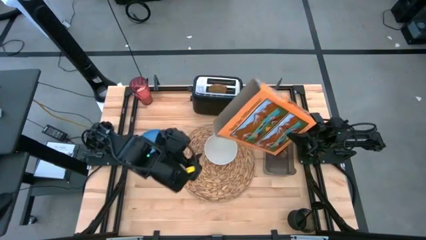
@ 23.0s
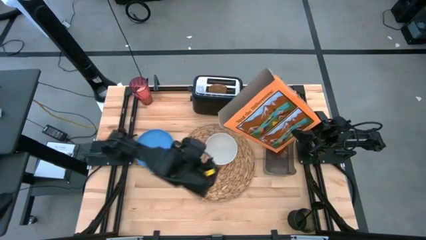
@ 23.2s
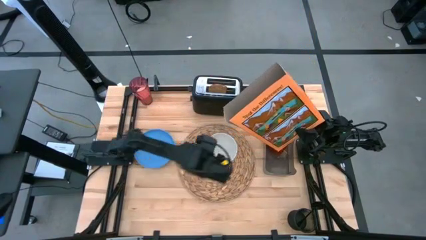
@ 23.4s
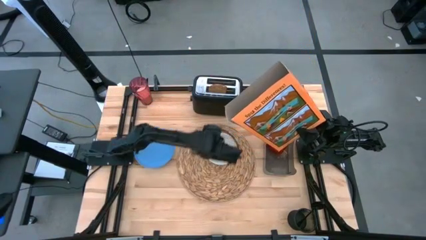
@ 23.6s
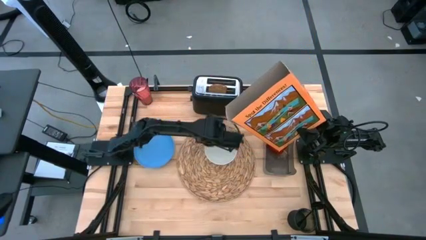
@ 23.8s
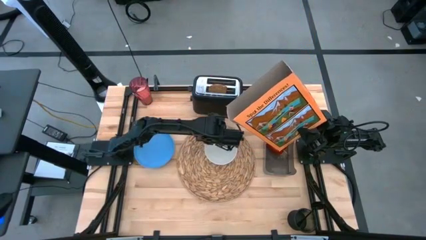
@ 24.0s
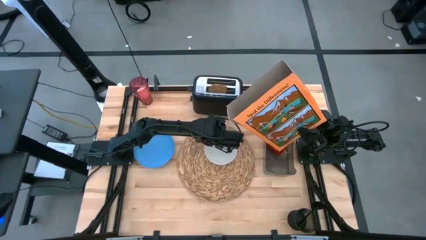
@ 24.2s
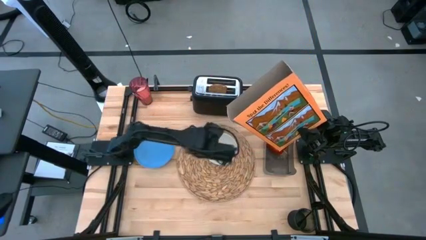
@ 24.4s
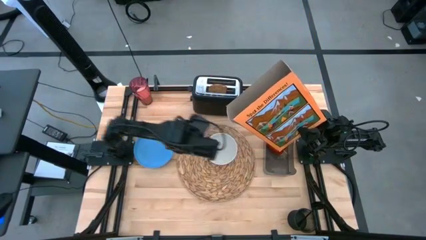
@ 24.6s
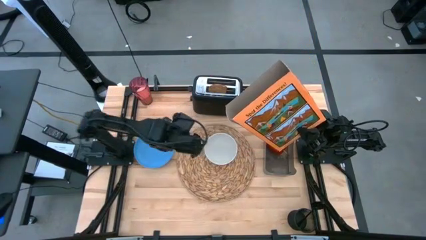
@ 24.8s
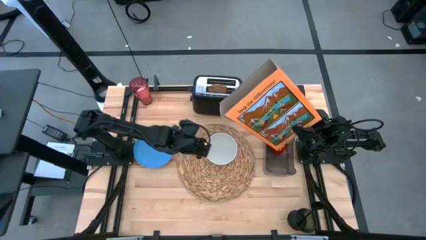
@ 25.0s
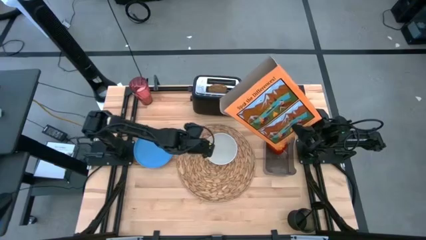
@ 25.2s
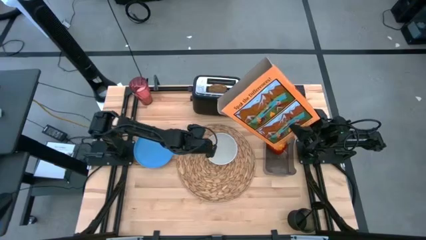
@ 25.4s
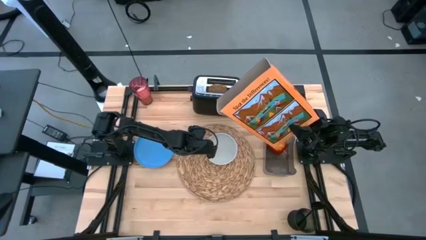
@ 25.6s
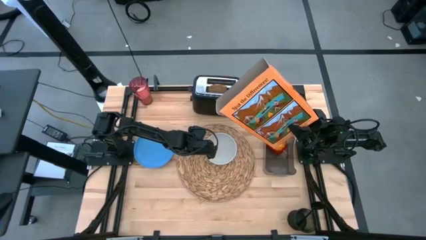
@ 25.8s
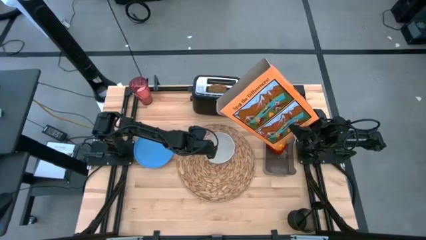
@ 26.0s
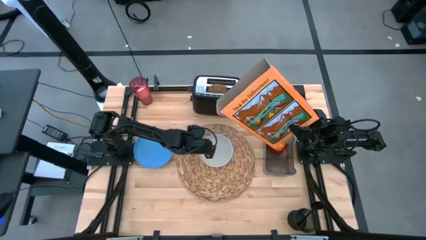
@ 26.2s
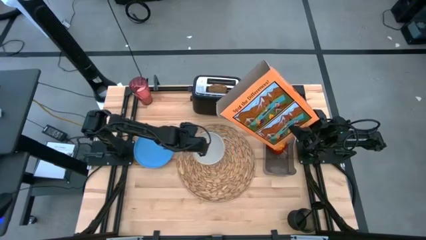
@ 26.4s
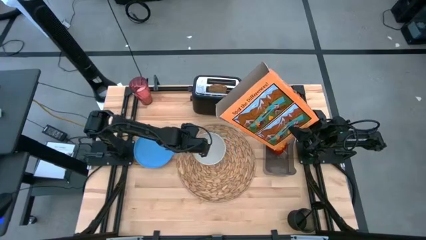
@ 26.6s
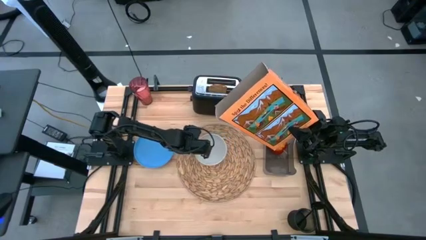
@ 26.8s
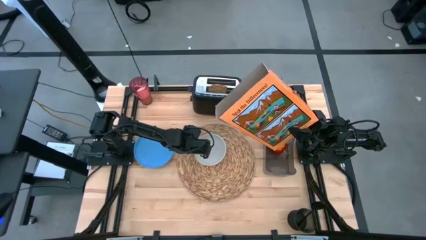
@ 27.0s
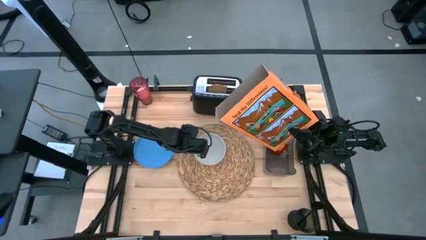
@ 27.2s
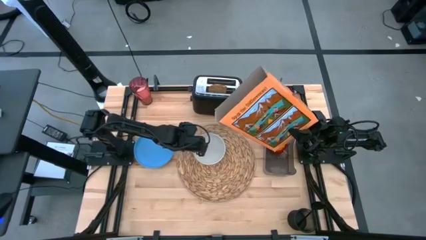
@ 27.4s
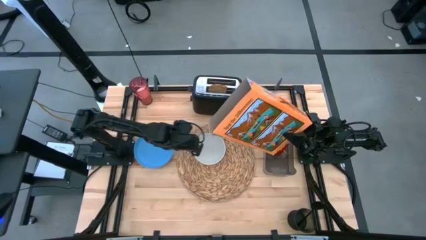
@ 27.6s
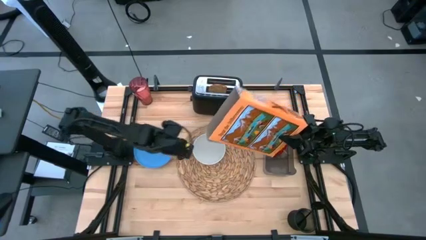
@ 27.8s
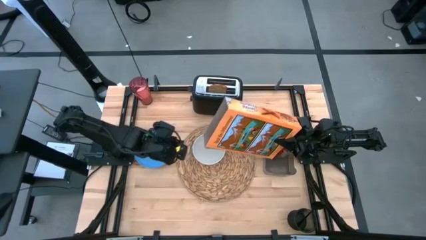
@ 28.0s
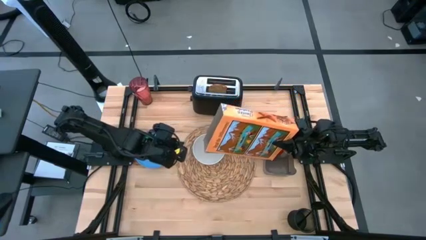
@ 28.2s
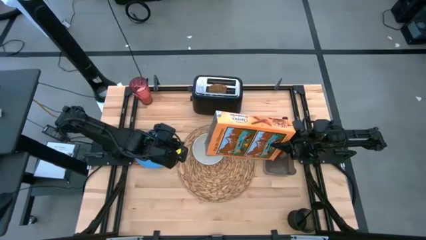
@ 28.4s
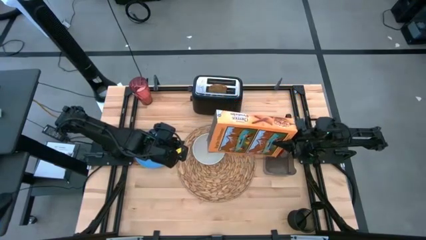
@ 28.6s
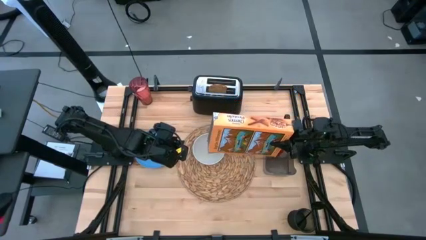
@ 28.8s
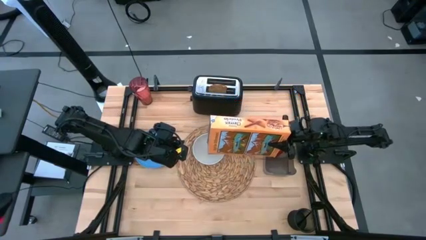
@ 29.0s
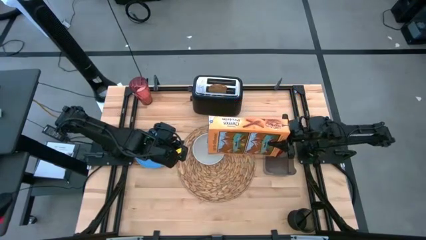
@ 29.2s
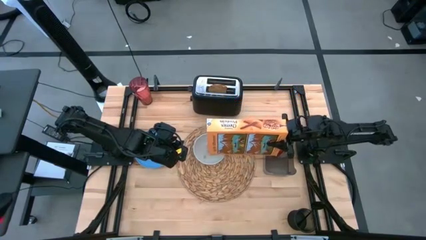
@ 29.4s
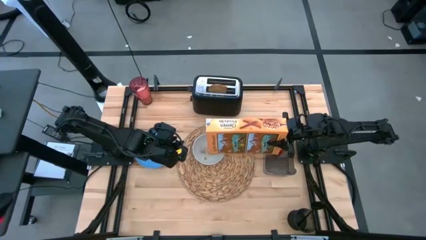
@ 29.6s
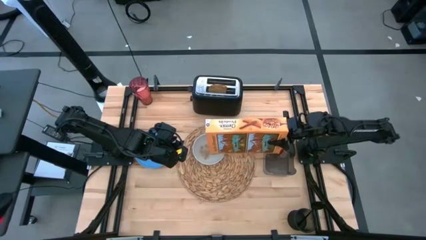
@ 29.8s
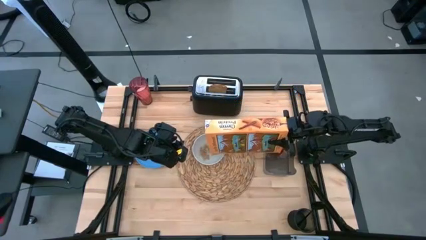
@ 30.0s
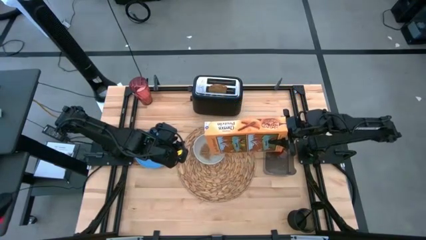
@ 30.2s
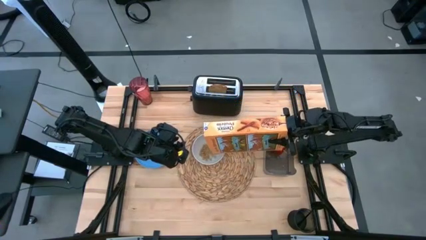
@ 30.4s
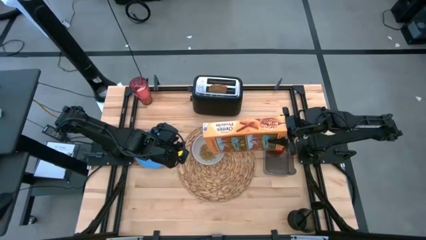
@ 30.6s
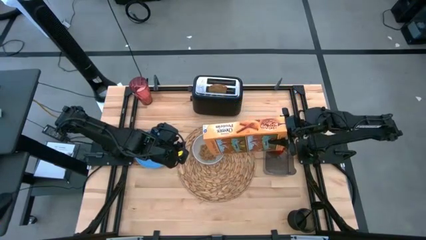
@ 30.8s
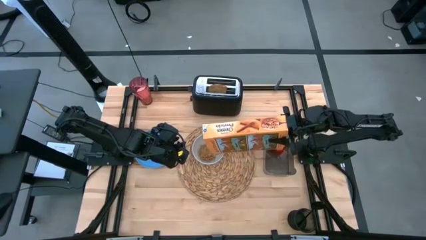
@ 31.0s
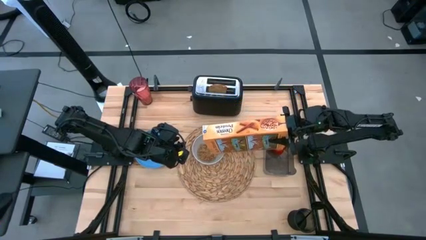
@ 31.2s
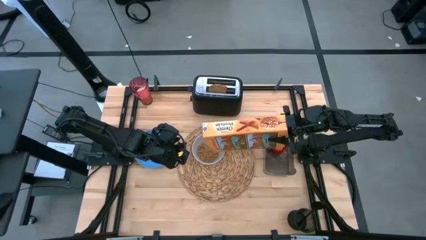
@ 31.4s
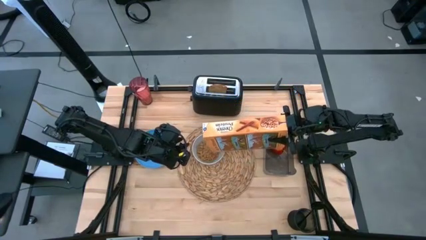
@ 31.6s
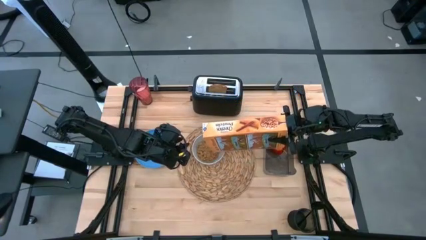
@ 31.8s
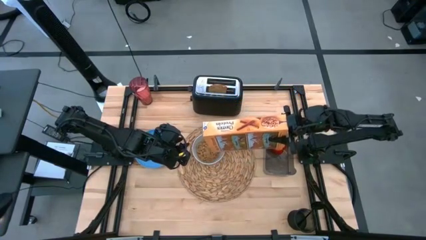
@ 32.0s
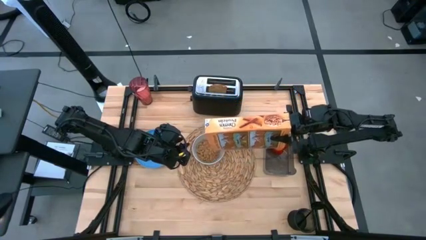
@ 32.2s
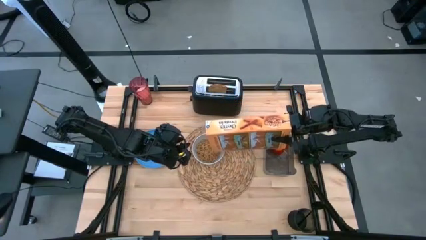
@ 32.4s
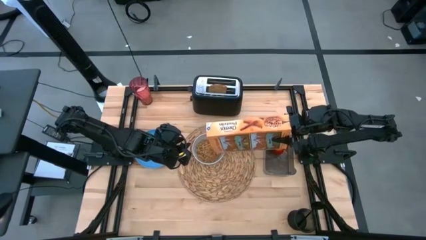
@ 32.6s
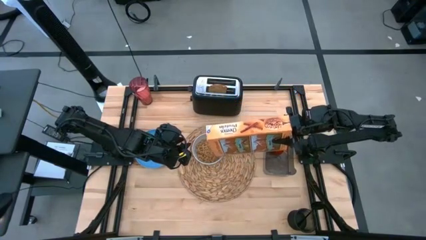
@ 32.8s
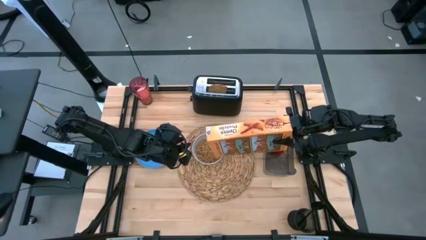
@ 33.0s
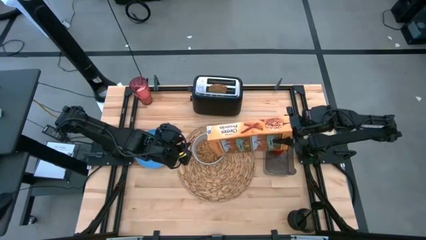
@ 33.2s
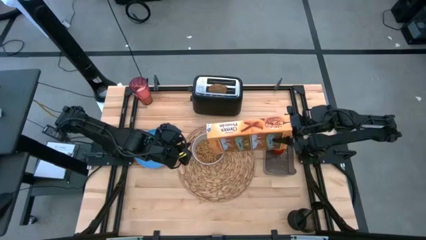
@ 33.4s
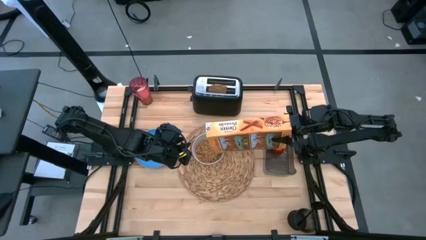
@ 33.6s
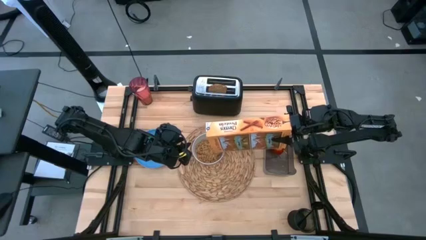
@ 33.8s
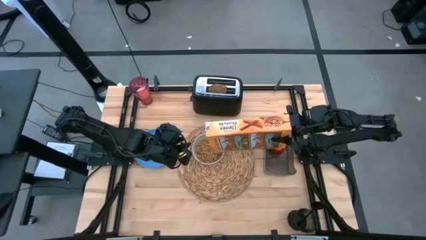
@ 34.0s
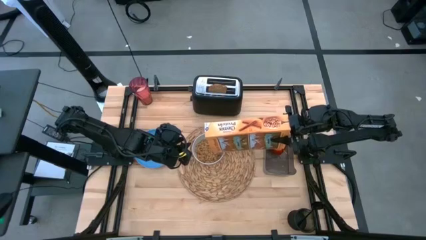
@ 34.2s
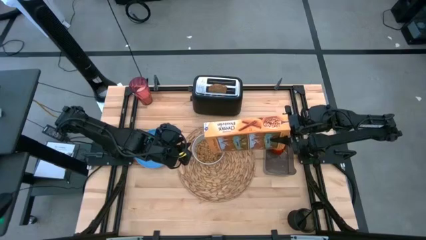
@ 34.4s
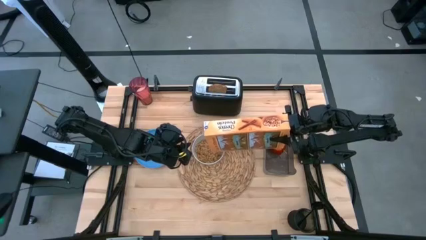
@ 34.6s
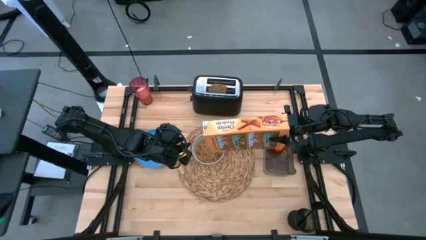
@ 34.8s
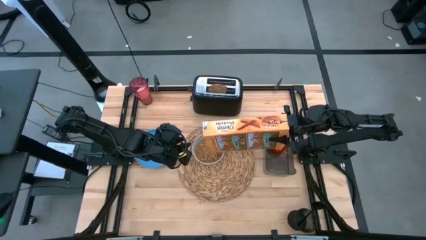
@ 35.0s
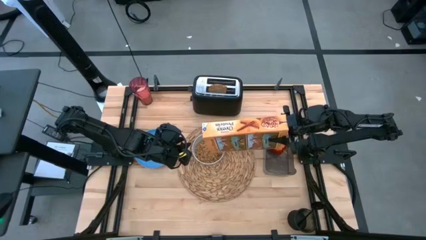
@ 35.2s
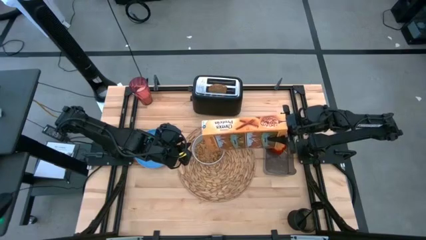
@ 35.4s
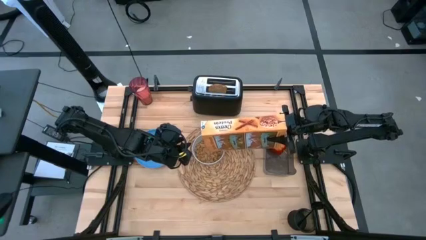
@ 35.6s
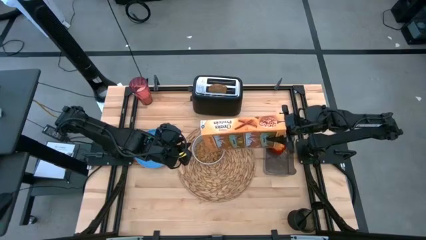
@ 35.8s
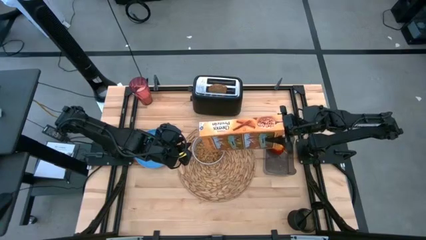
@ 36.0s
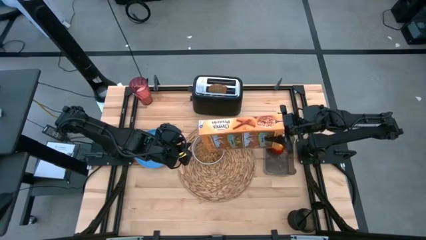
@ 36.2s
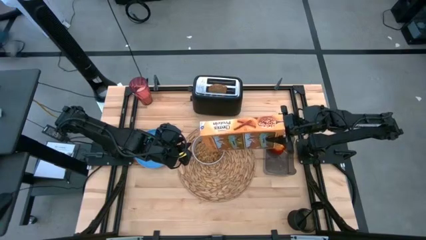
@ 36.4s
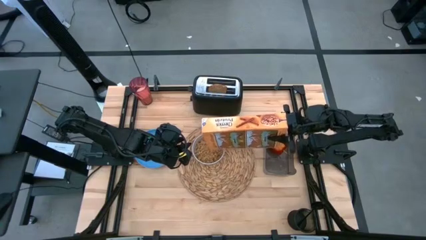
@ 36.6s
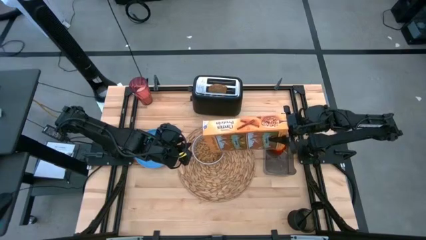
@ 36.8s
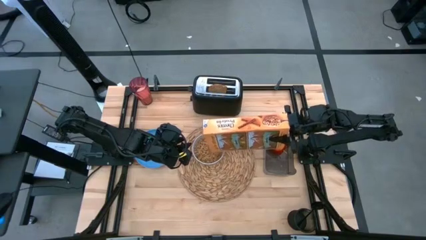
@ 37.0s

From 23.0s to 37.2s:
Task: Arrange a breakfast setting
Pour the cereal from the cereal box into the bowl

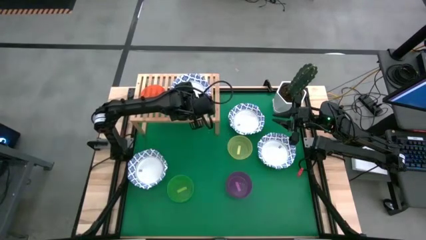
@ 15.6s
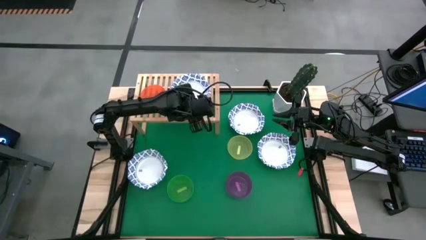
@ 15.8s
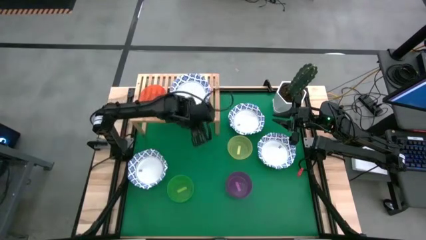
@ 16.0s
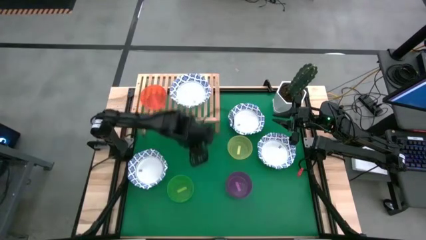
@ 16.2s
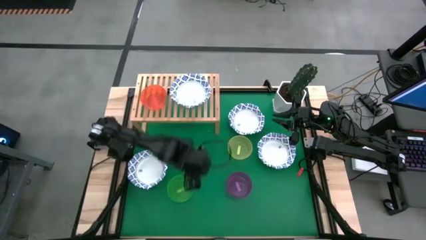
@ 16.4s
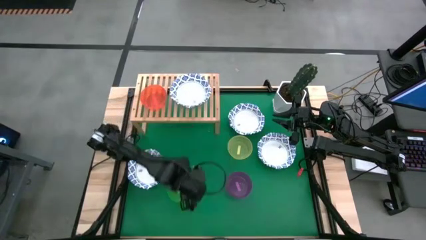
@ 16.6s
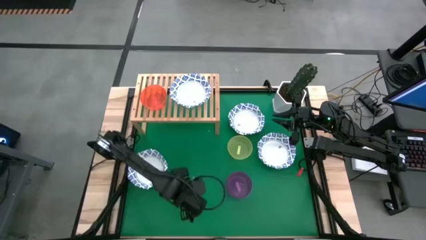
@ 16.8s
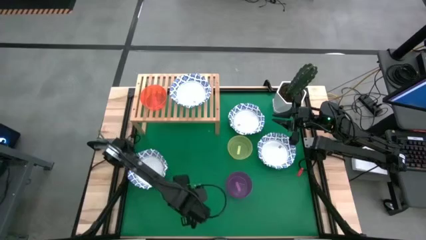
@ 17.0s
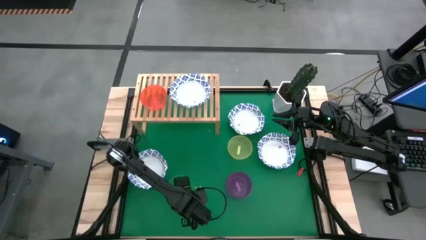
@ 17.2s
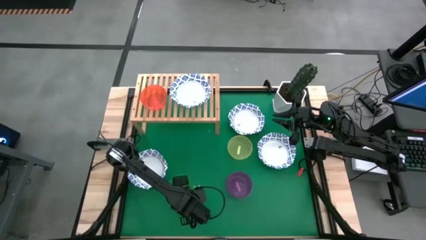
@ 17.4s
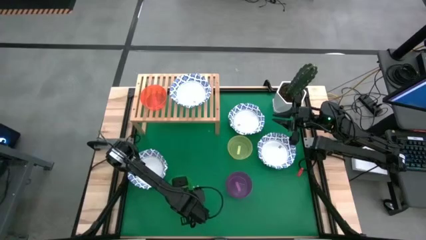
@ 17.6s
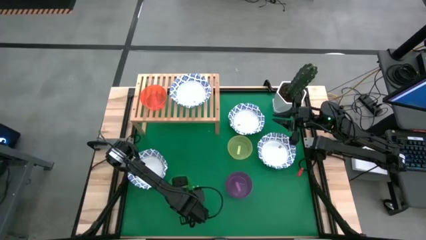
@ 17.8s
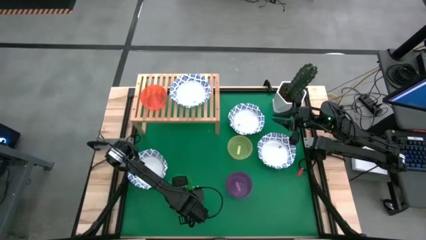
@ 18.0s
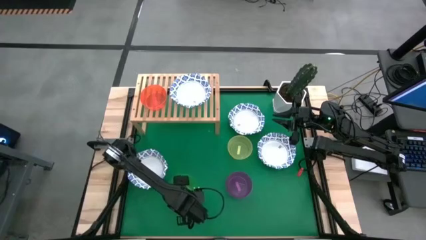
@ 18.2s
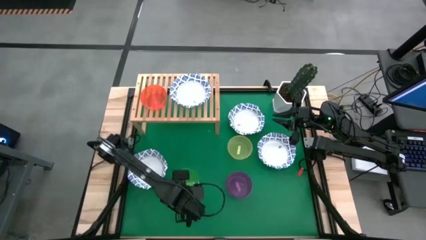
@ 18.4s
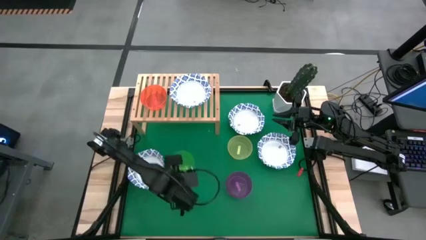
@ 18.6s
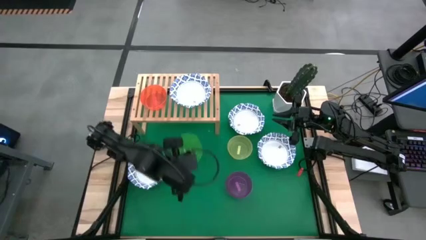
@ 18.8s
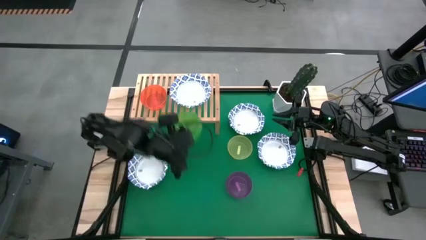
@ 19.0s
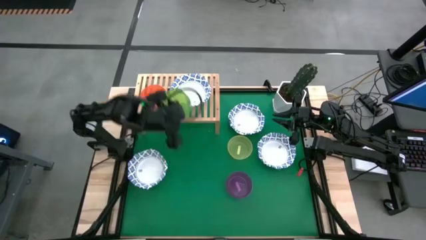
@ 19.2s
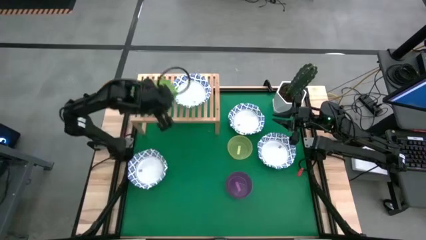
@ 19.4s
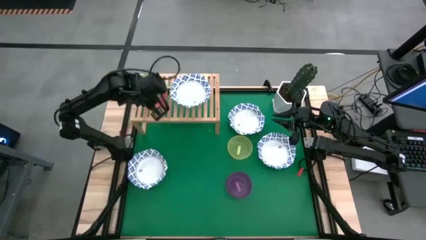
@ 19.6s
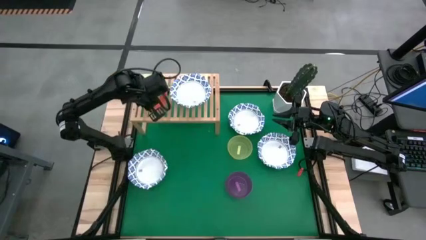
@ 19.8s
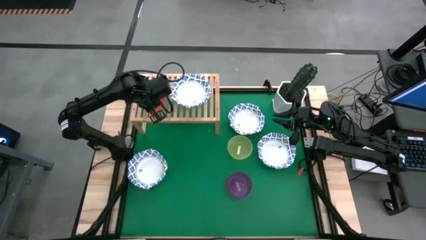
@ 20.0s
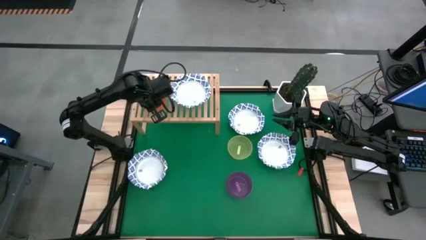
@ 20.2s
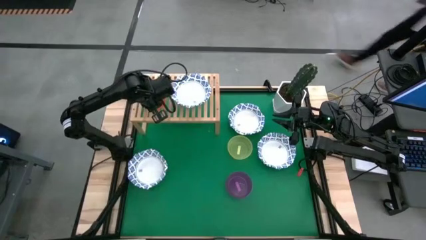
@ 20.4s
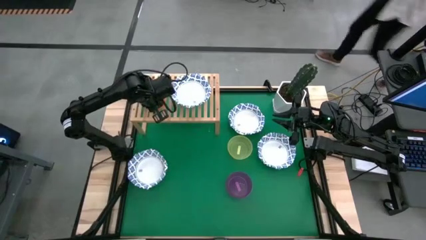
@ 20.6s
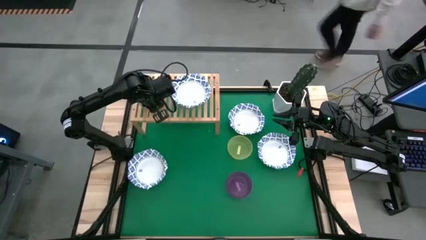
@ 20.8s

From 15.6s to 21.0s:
Task: Place and stack bowls onto a shelf
Stack the green bowl on top of the orange bowl on the shelf
